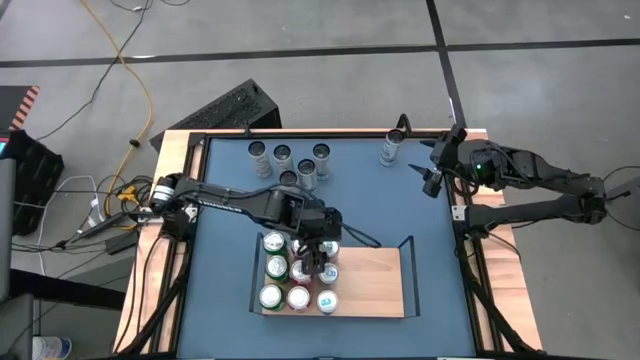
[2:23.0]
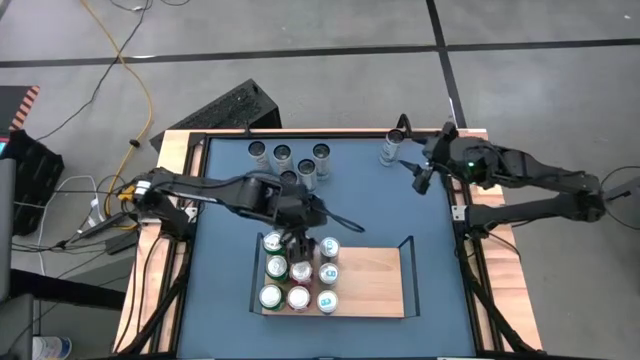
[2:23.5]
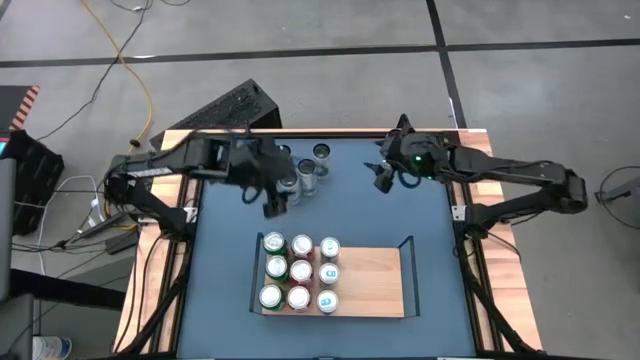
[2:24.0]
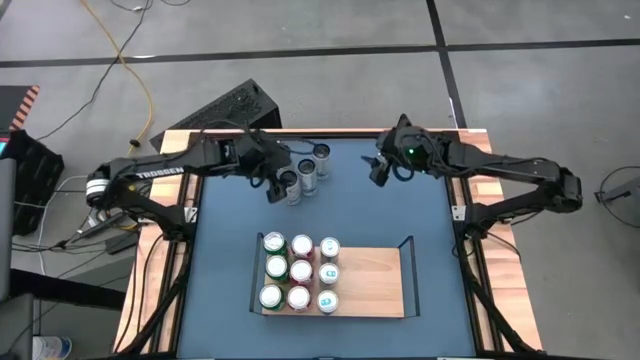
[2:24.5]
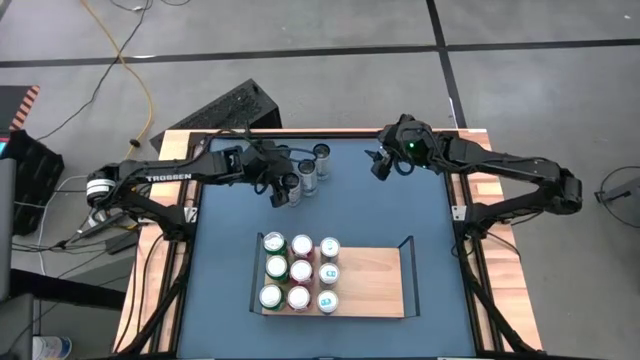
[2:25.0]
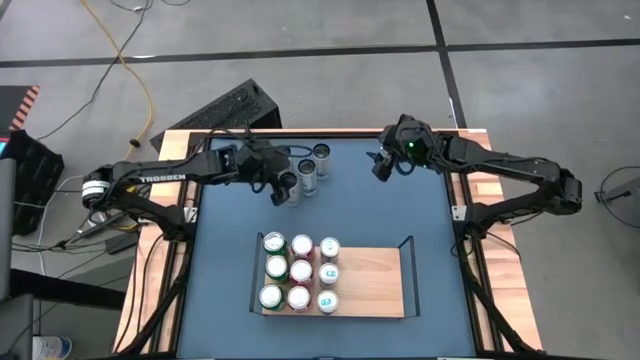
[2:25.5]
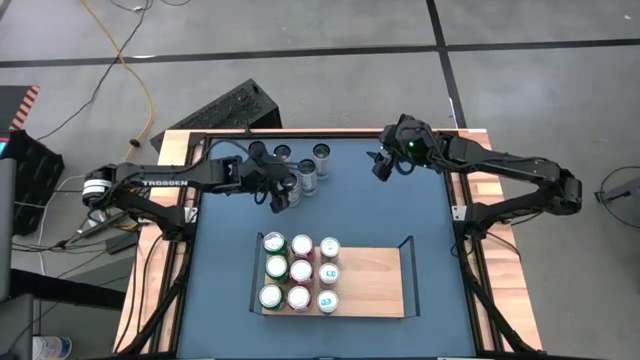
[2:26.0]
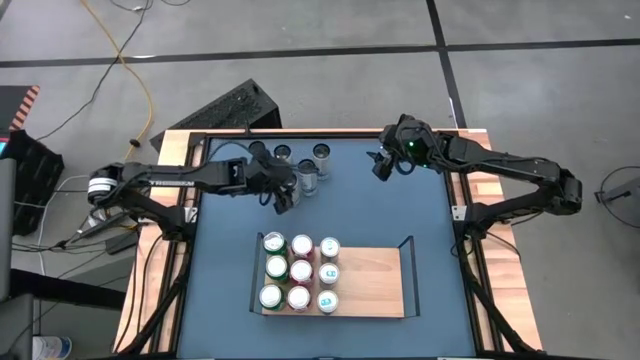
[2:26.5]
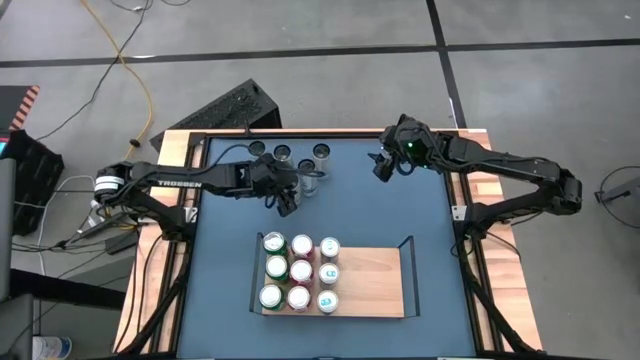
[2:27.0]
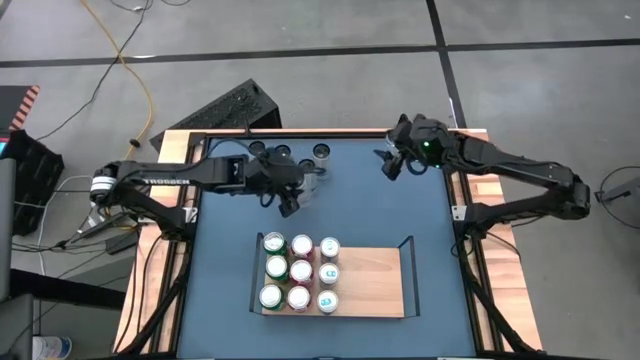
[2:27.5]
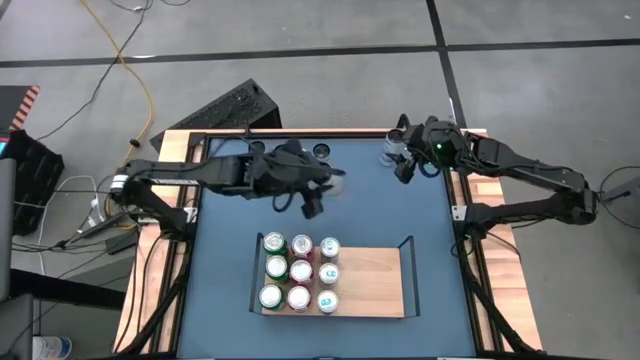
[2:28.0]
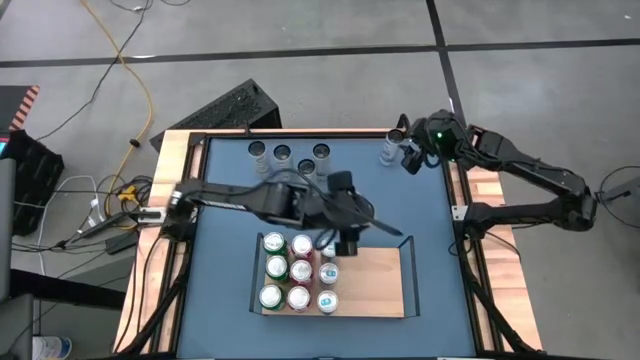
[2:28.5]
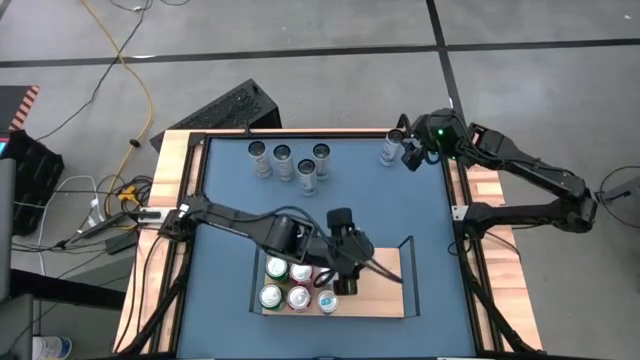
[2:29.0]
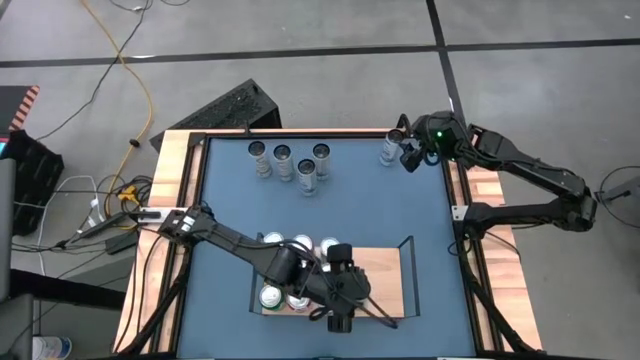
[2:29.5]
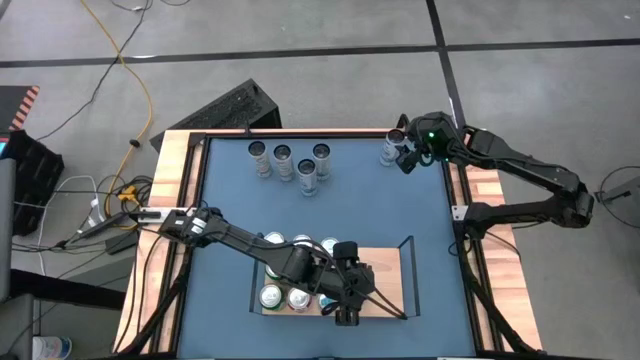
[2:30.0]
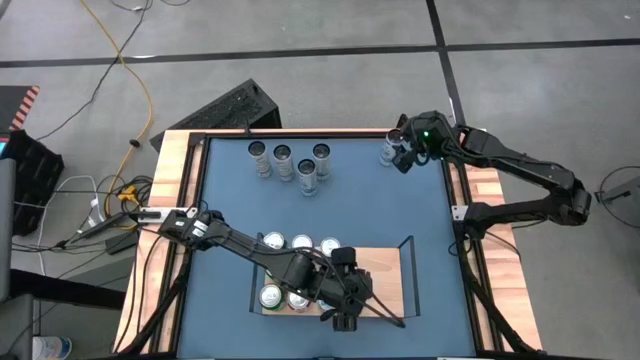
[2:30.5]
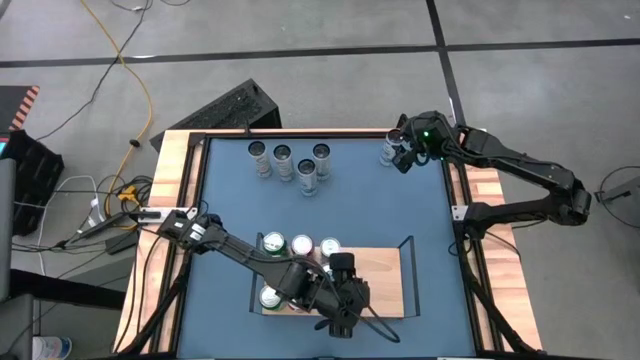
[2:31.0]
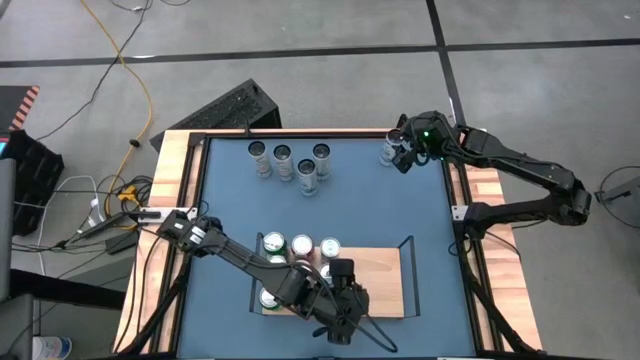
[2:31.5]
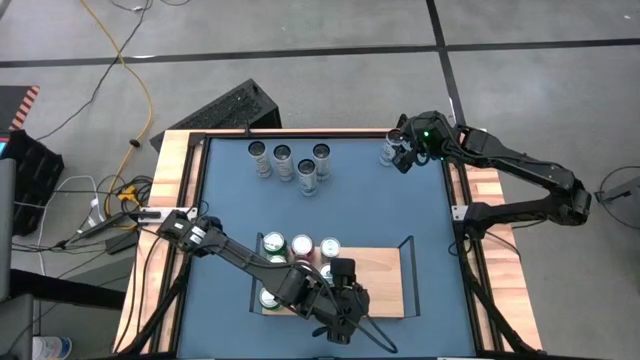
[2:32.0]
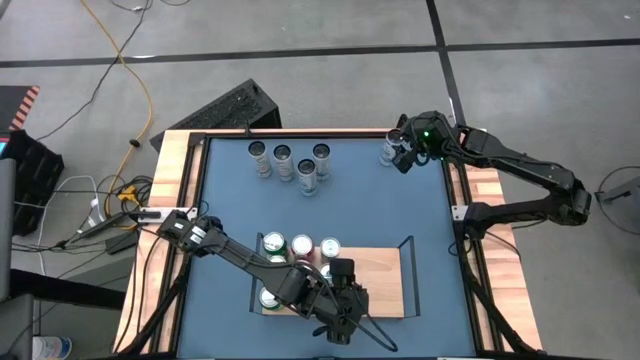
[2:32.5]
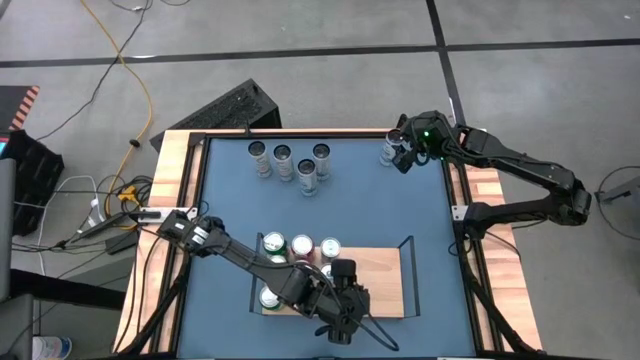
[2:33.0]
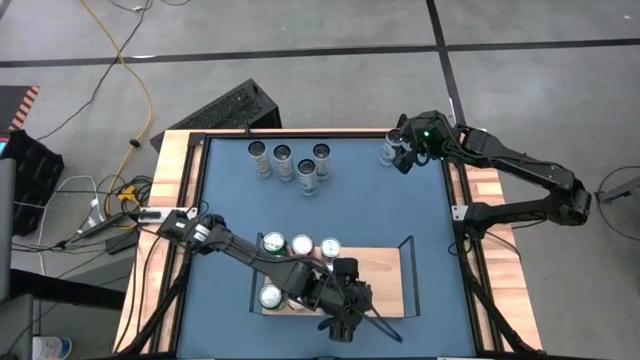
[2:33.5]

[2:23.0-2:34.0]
Task: Place canned beverage on shelf
Put the bottom right white-yellow soda can on the shelf

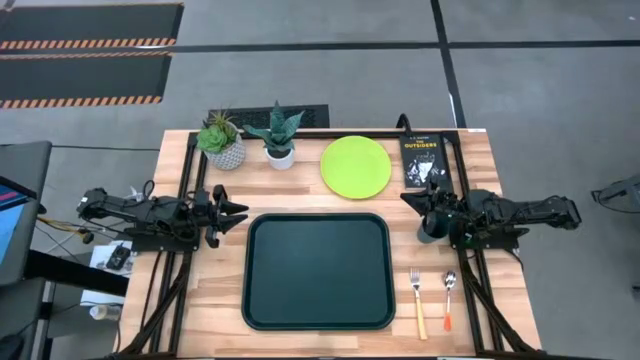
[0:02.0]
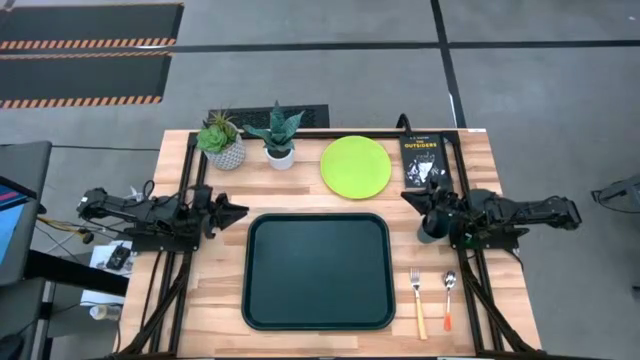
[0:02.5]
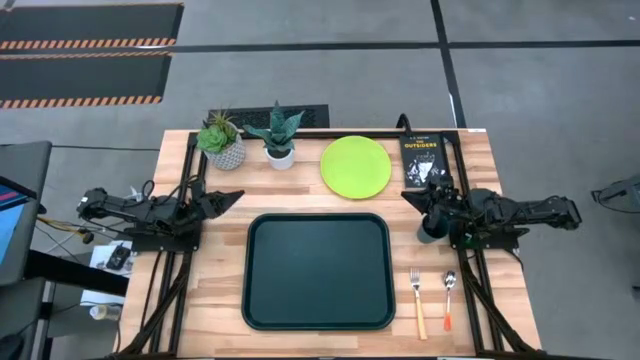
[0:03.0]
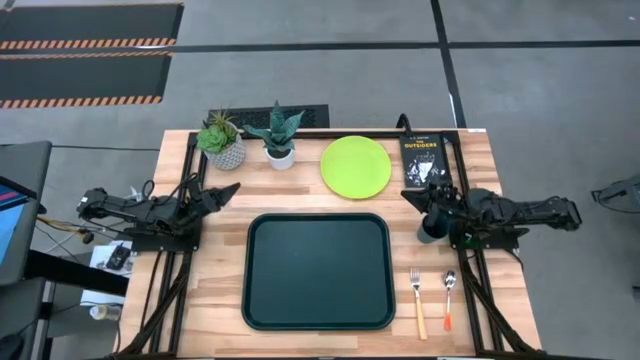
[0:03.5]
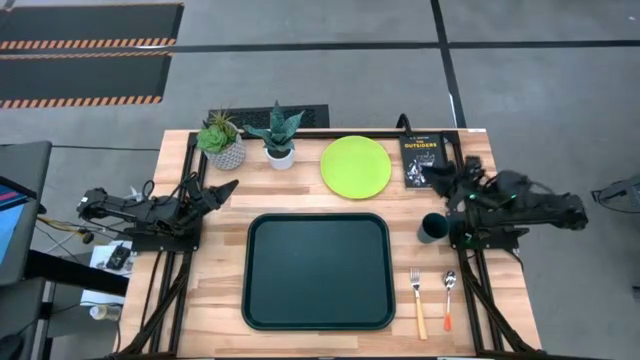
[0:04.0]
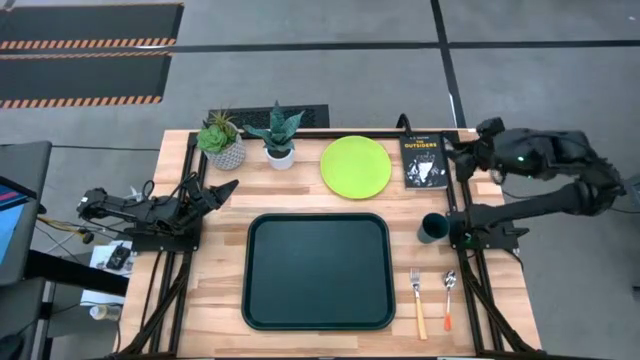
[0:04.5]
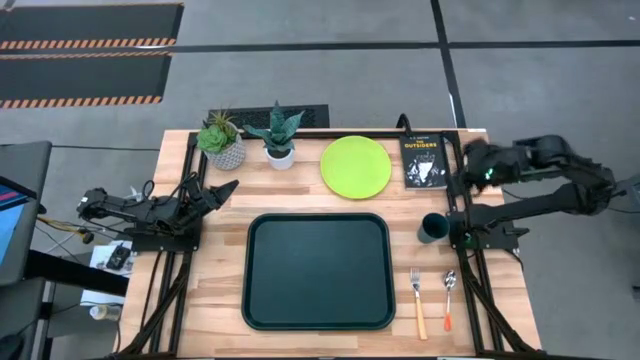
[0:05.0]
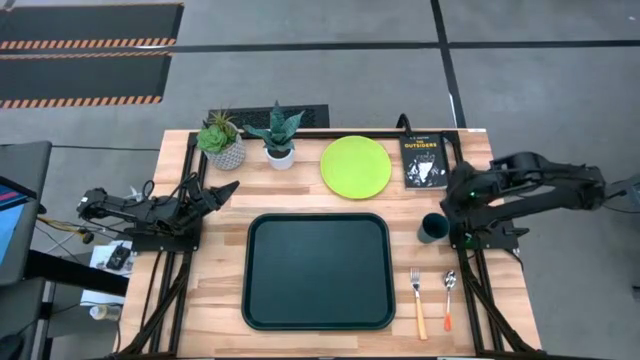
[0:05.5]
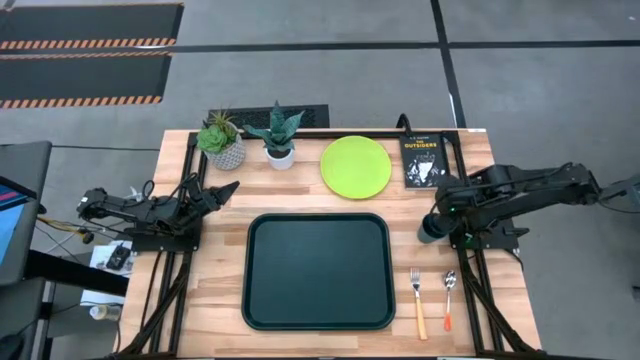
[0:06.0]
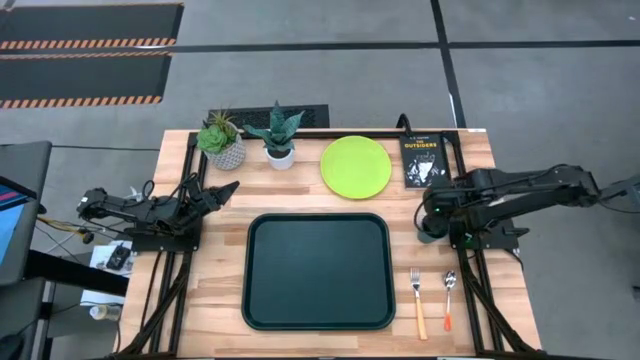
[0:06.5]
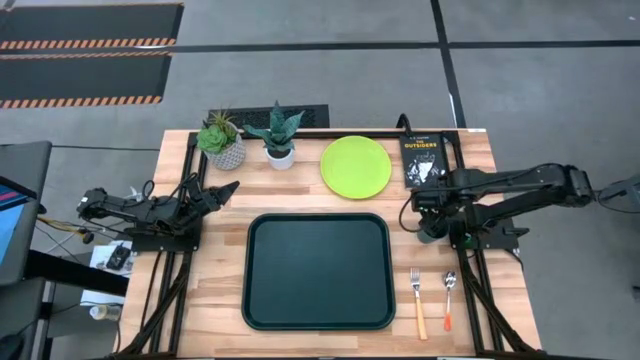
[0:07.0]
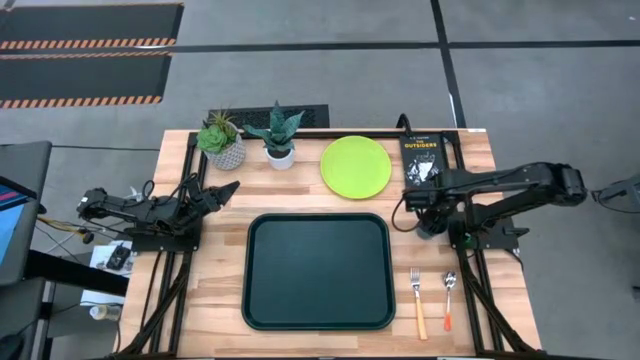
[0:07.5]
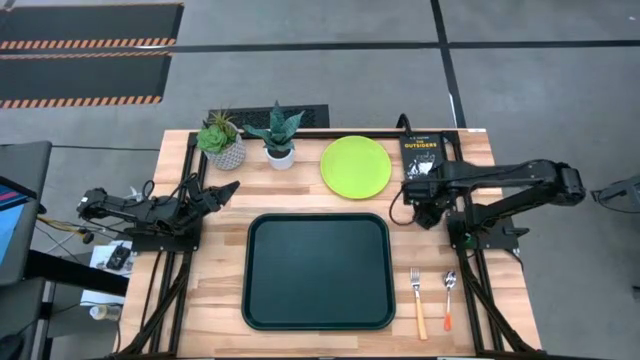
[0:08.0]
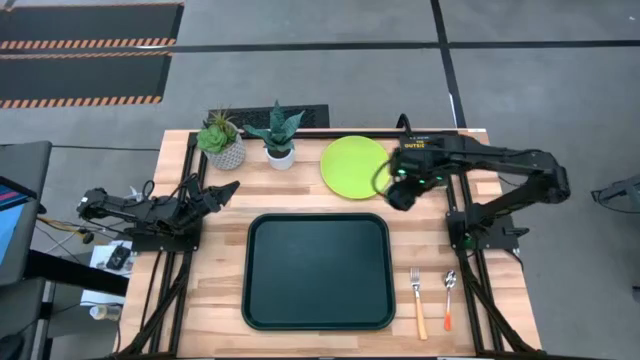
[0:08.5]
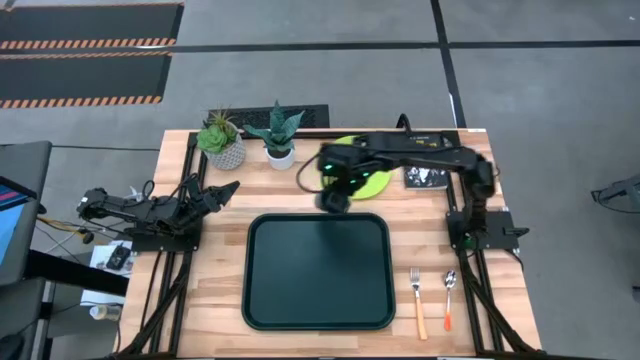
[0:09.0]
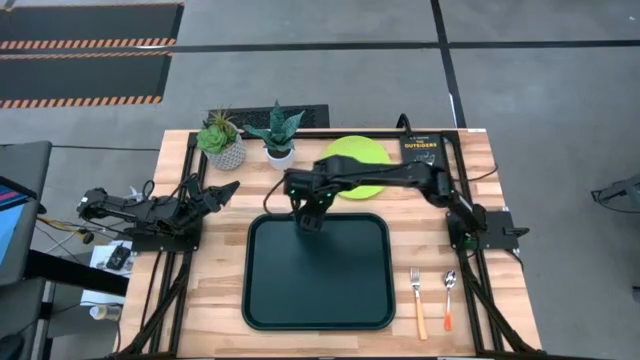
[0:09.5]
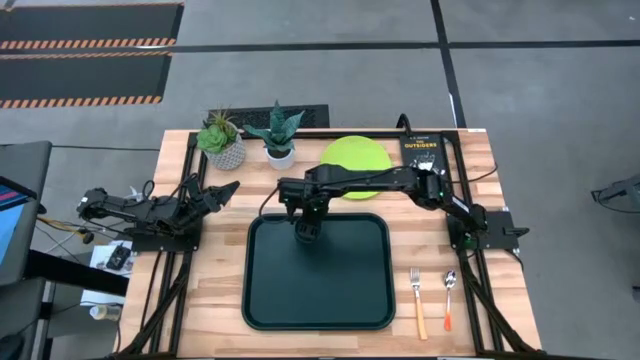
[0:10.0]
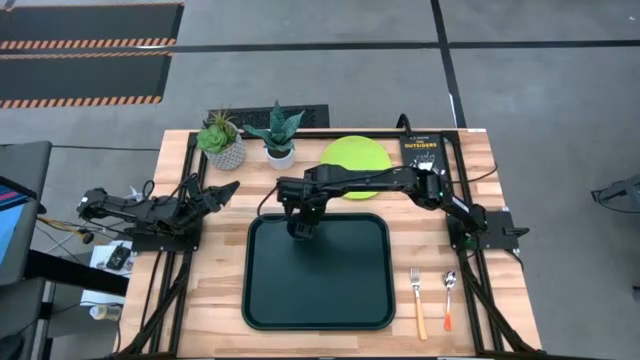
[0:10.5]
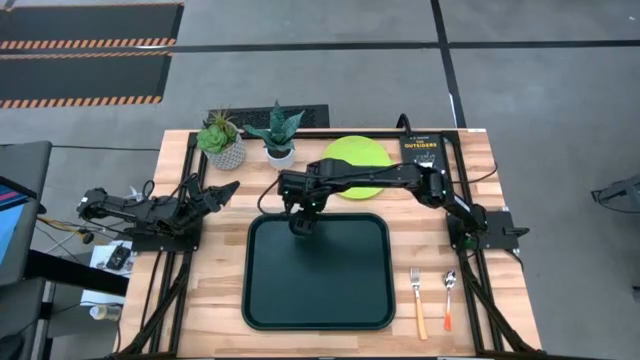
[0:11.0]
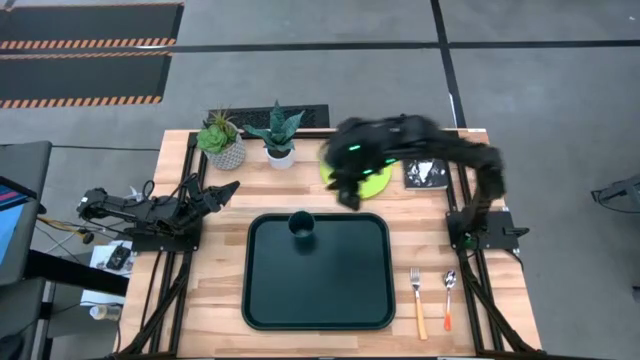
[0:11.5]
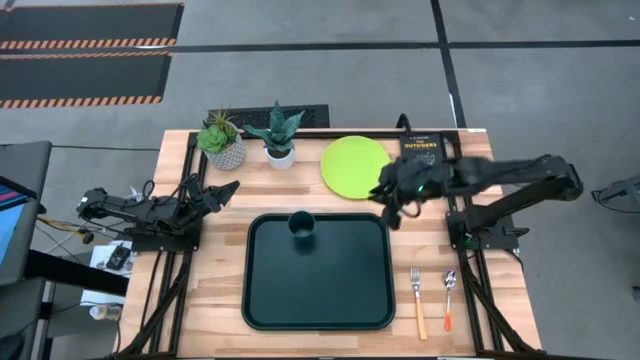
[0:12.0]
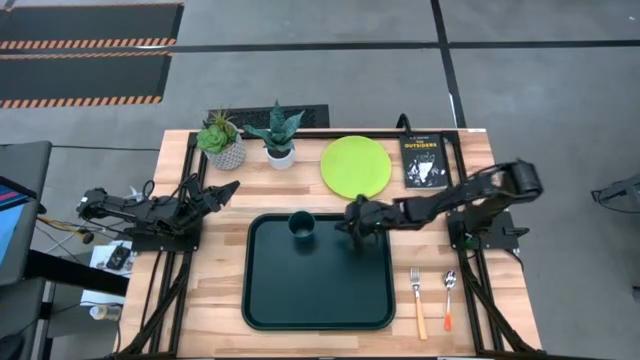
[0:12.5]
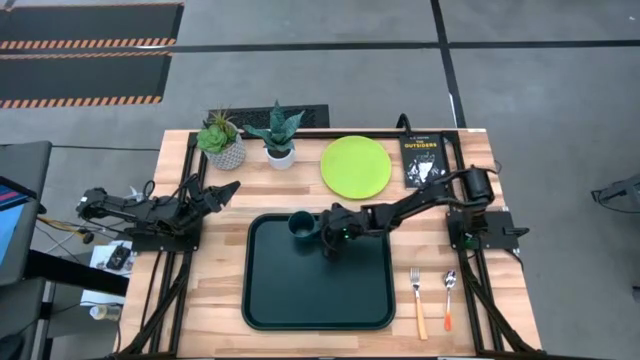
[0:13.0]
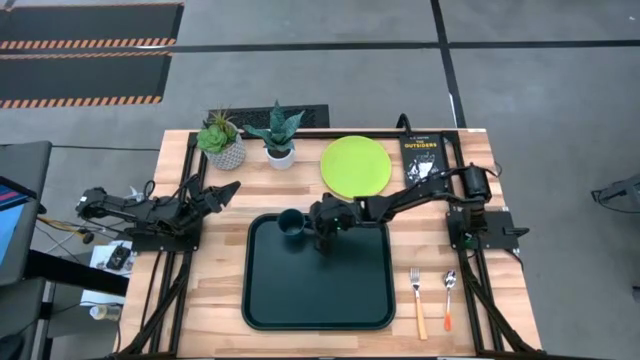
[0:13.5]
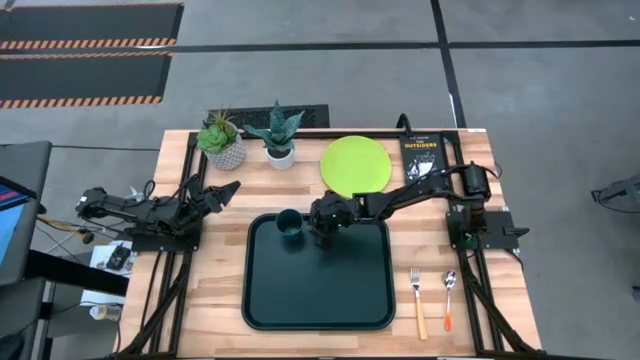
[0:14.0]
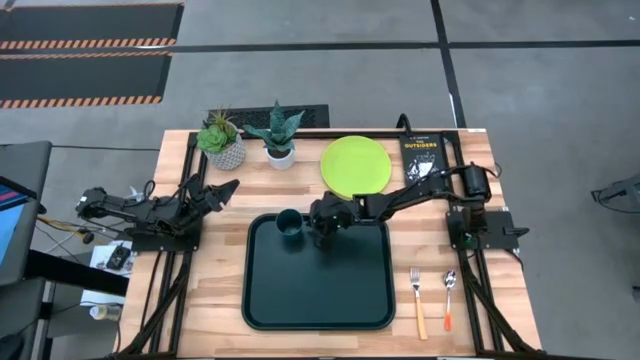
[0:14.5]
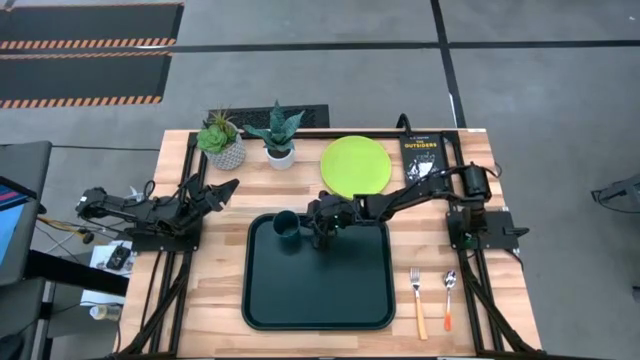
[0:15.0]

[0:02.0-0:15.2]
Task: Pick and place plate/cup/fork/spoon on tray
Put the dark green cup on the top left of the black tray
